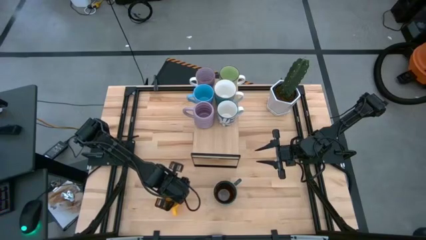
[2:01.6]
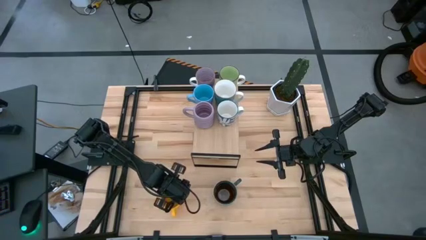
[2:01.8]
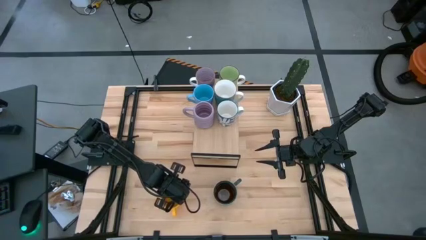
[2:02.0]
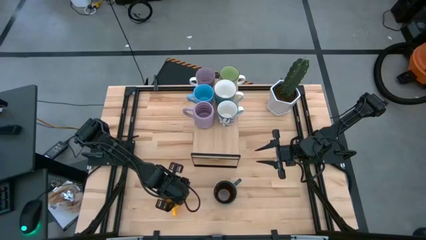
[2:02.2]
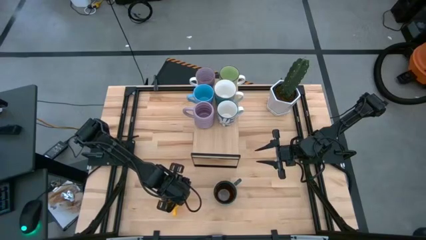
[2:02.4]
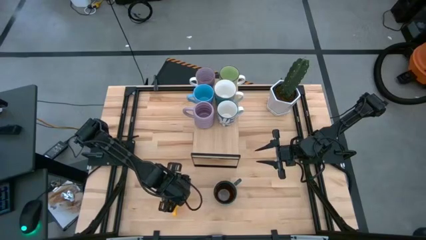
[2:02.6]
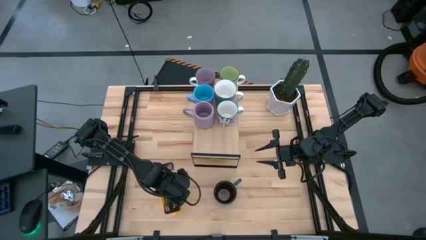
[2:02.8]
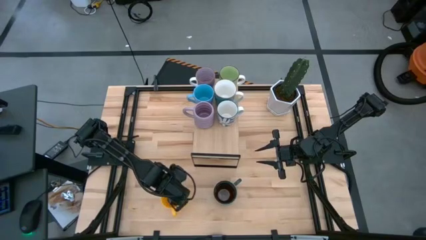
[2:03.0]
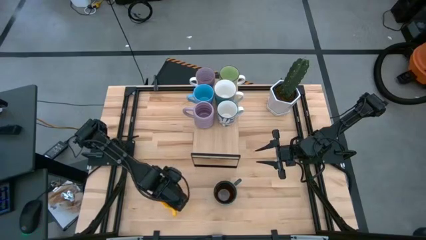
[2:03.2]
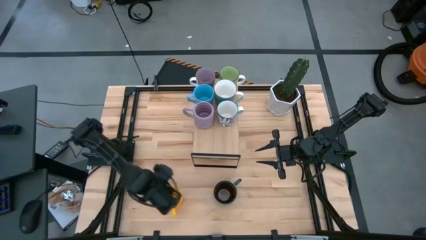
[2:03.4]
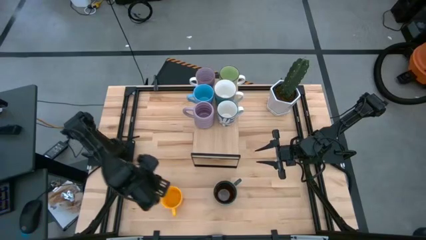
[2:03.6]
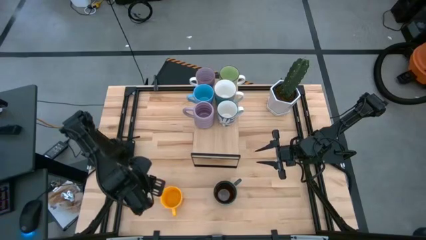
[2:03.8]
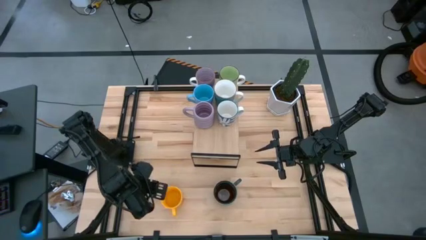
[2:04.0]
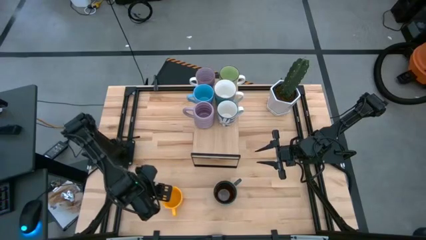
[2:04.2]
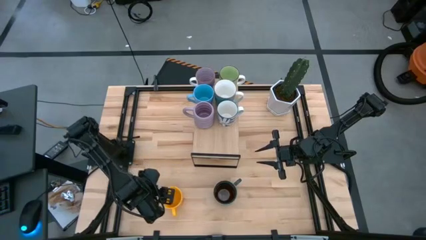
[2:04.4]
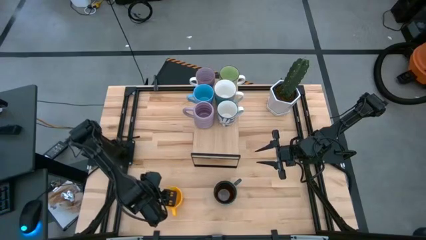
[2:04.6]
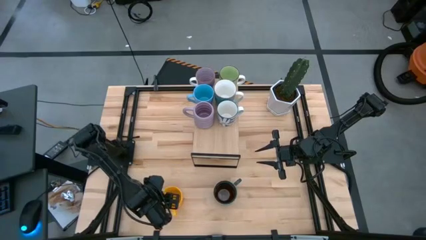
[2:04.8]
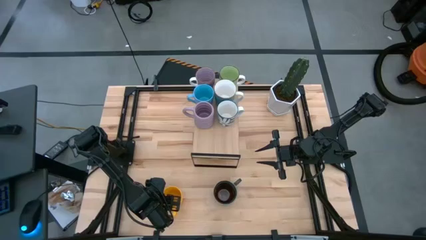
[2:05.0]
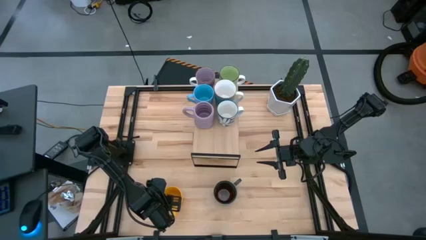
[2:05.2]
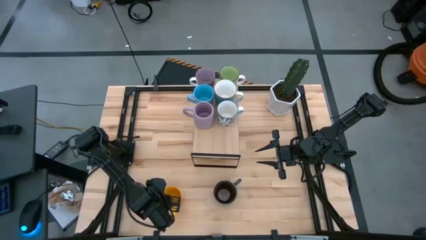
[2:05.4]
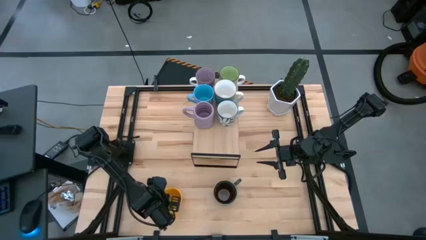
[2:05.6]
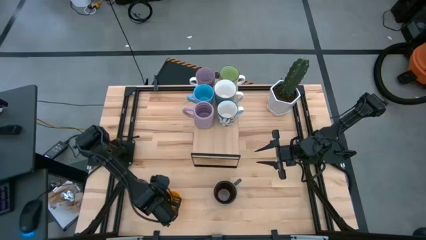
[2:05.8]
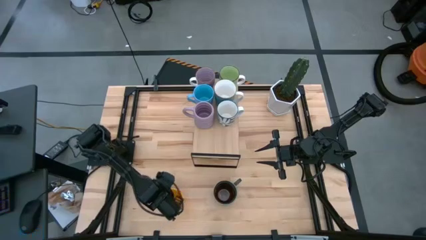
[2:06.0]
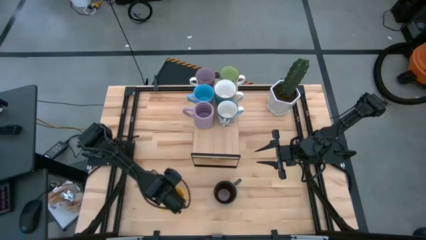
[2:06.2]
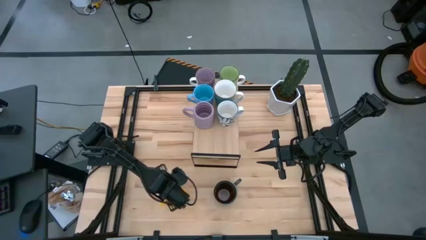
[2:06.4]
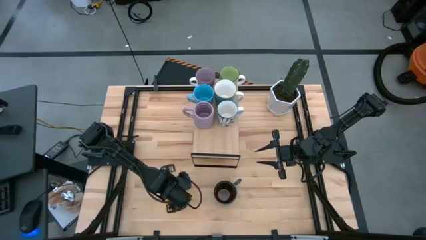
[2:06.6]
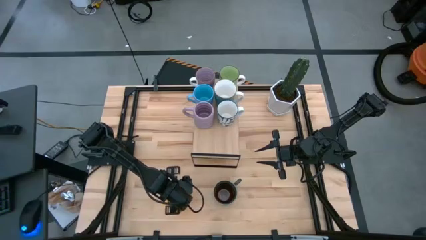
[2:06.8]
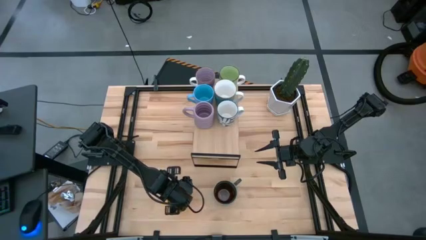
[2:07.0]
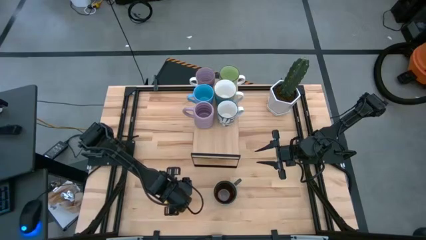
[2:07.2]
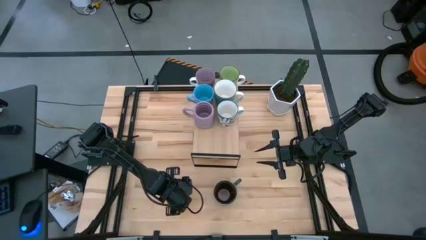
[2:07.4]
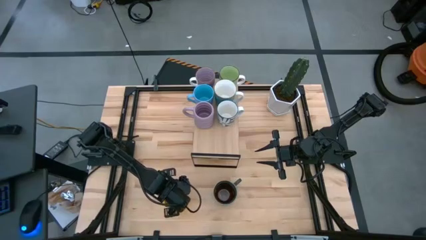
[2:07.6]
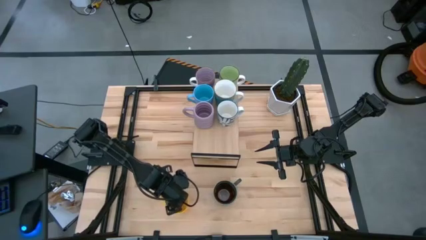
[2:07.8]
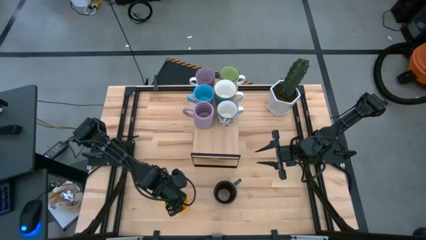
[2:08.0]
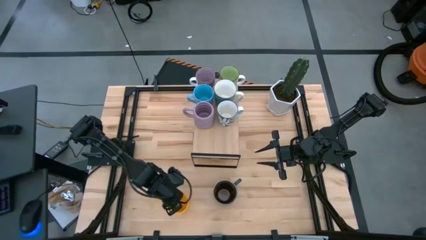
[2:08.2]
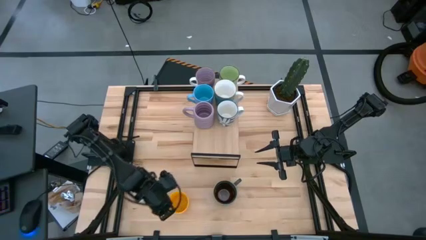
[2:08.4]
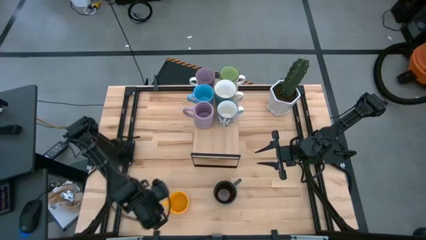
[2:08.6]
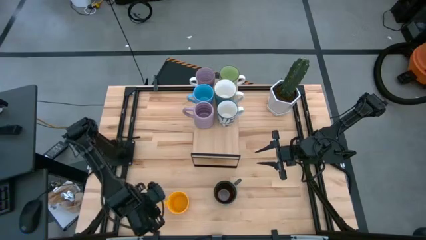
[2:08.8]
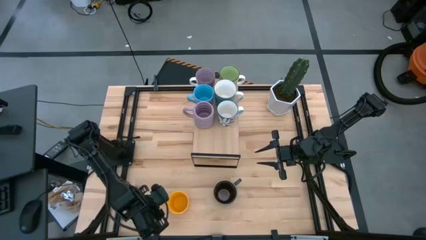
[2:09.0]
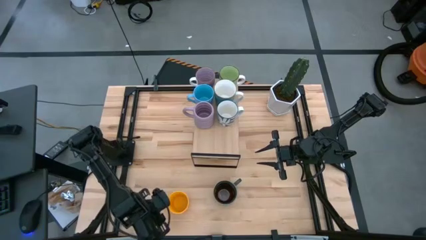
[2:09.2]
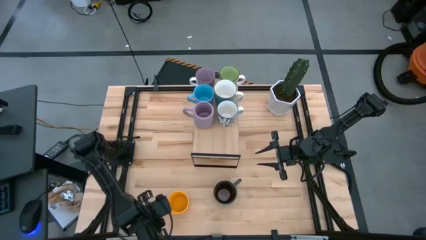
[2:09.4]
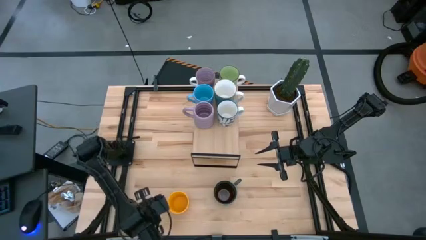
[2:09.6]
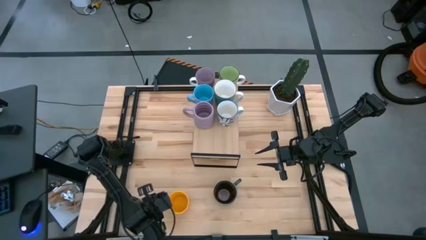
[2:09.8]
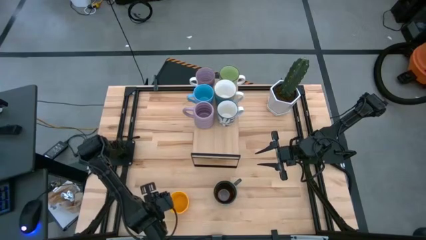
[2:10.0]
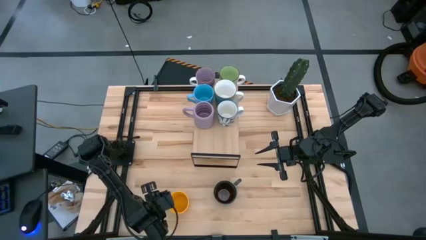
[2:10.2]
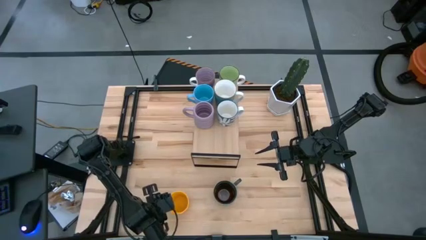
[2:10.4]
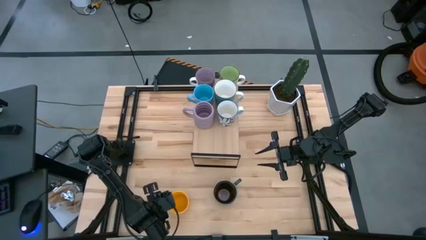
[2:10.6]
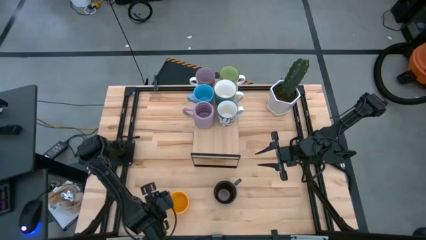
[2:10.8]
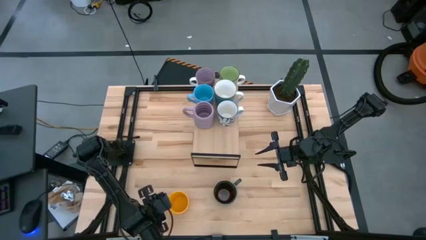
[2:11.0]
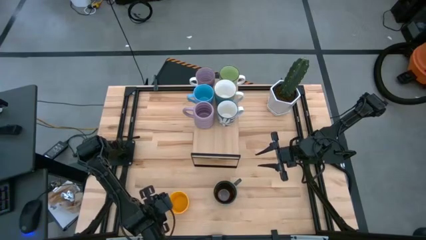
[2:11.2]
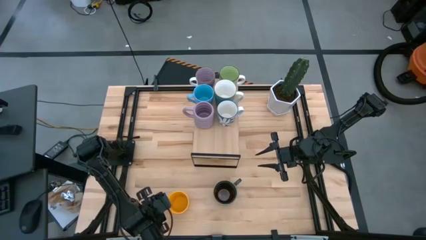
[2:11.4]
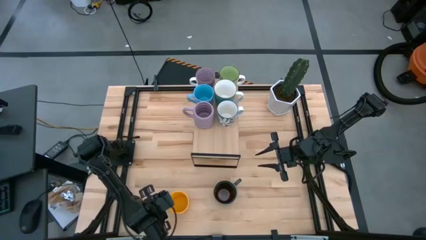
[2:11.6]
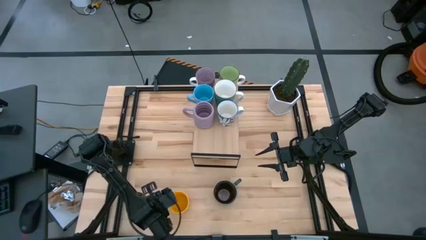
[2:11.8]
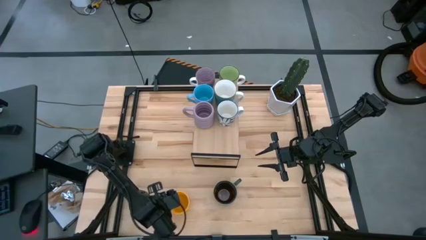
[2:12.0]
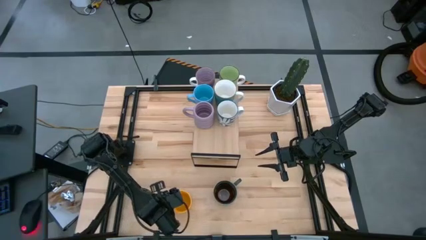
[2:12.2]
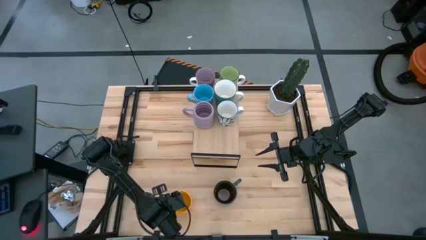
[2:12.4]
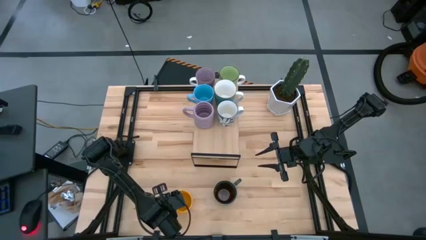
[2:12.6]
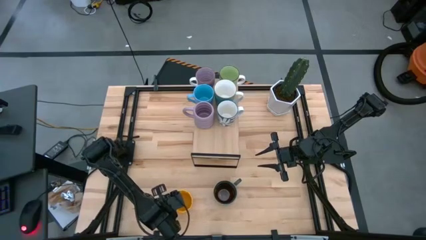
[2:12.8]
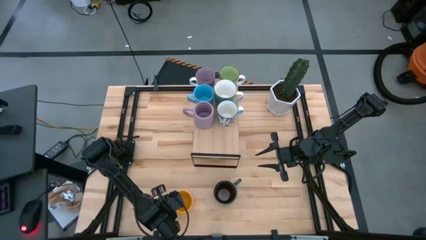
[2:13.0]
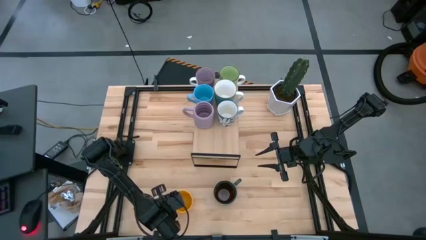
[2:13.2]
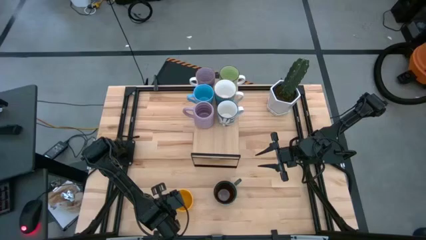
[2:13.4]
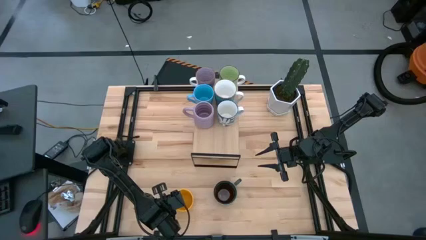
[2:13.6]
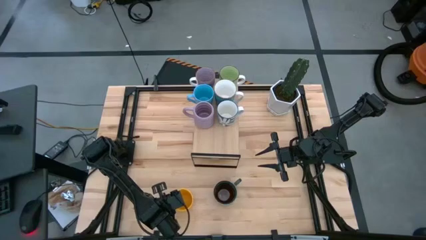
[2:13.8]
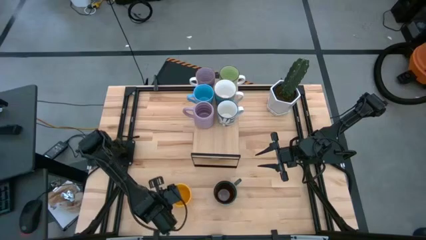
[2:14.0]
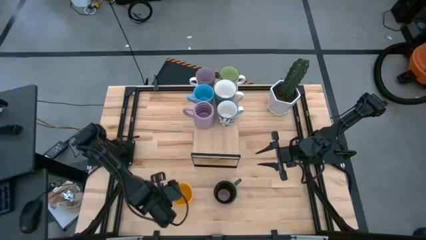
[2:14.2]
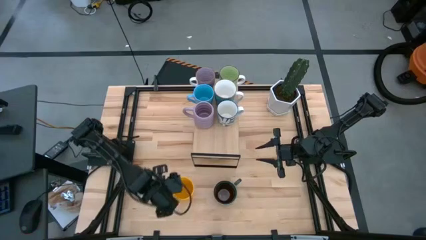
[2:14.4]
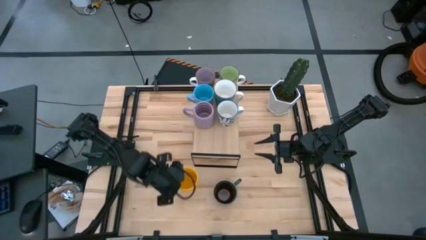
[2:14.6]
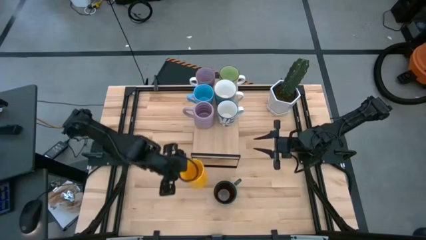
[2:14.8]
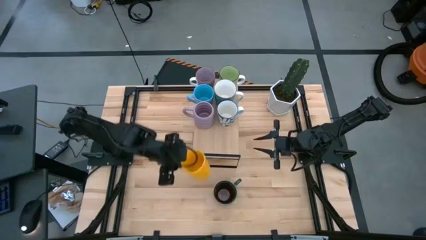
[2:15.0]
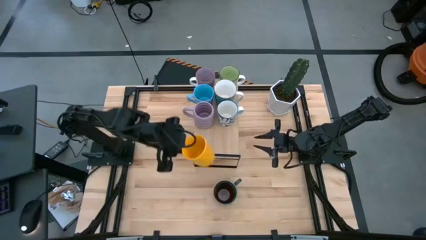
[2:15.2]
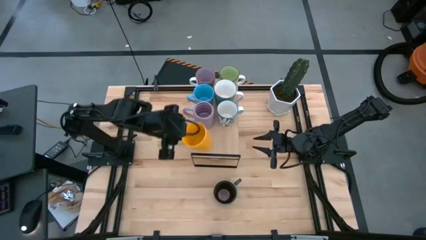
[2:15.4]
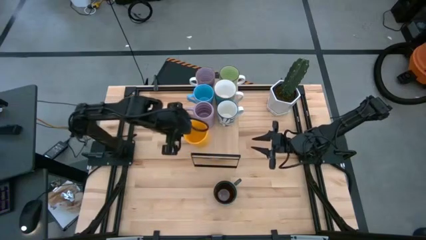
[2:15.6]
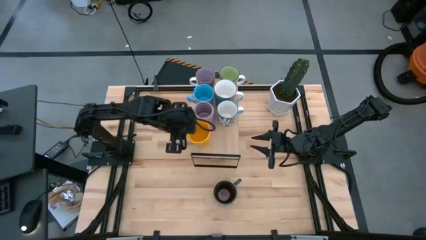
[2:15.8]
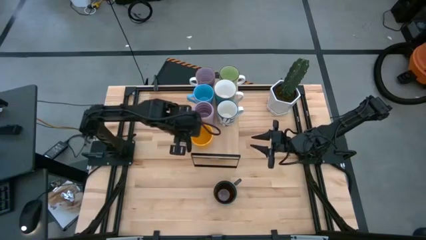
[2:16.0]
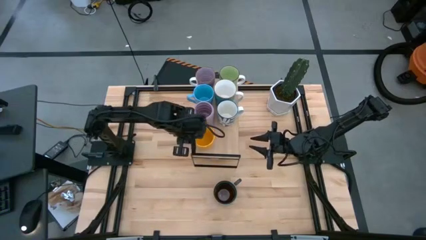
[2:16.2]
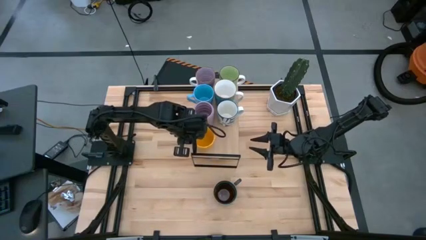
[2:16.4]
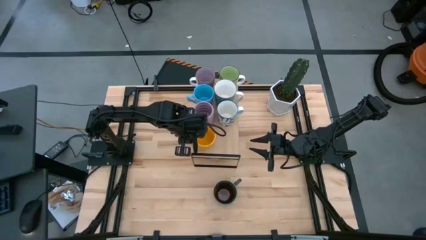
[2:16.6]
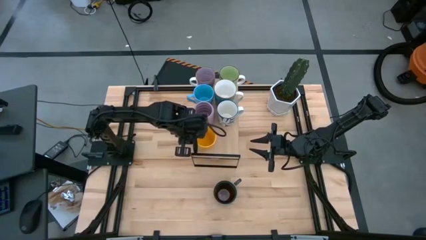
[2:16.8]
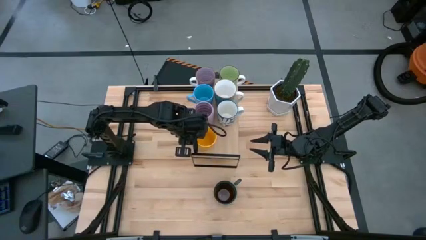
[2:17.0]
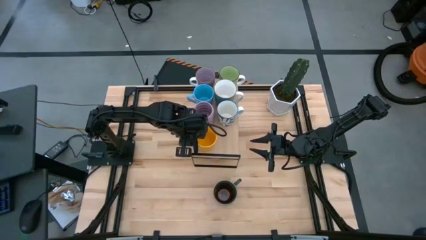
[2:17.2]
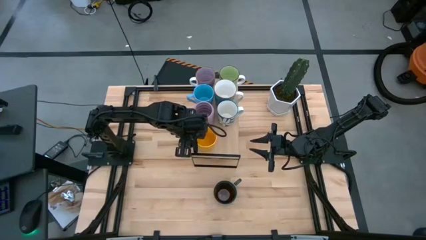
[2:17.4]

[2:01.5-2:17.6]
Task: Place coffee mugs
Put the yellow mug on the shelf

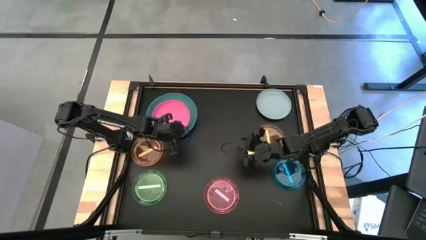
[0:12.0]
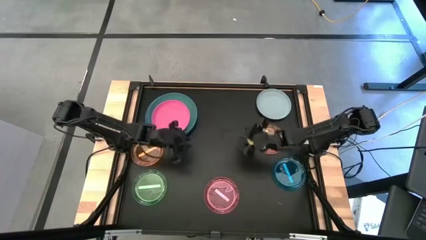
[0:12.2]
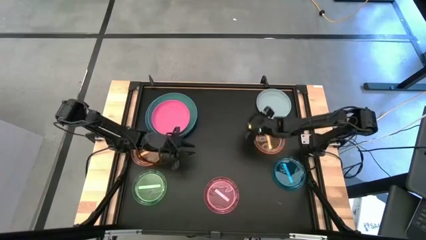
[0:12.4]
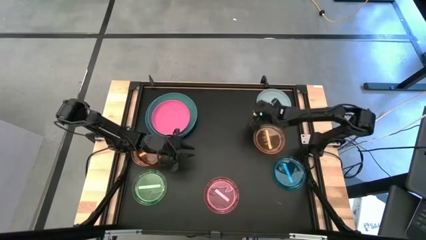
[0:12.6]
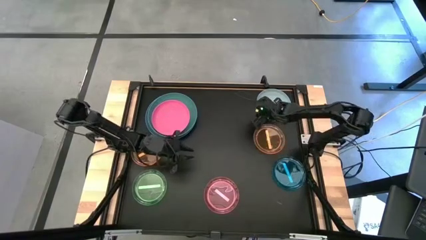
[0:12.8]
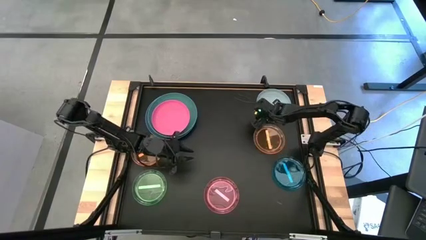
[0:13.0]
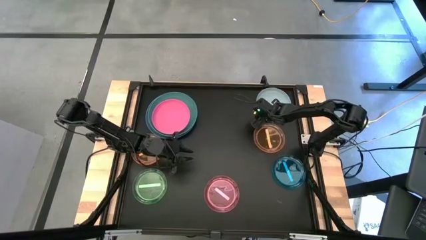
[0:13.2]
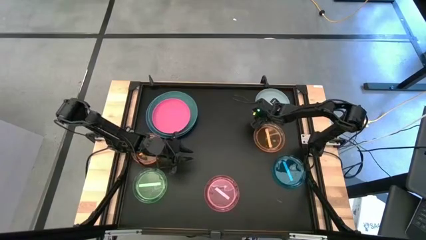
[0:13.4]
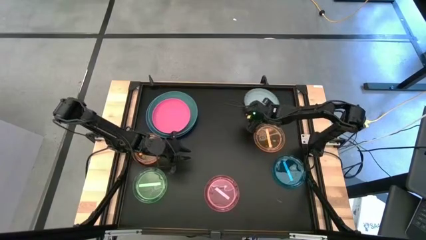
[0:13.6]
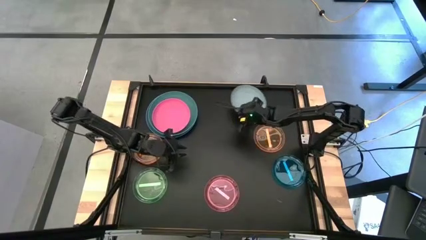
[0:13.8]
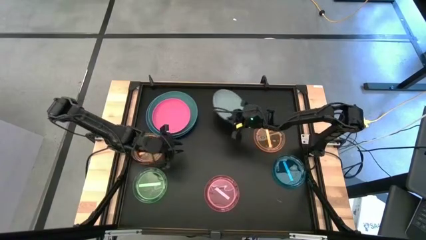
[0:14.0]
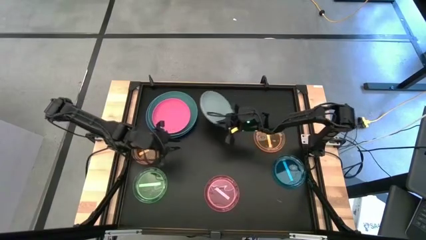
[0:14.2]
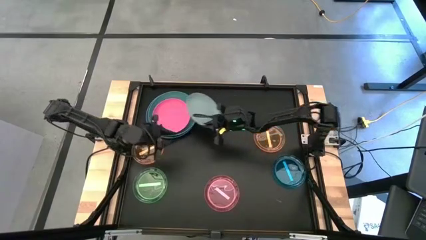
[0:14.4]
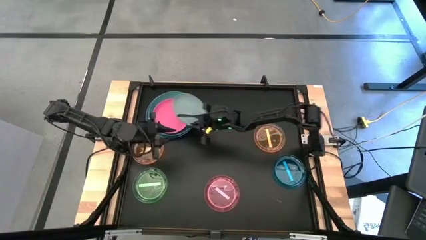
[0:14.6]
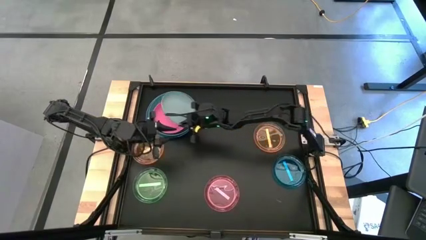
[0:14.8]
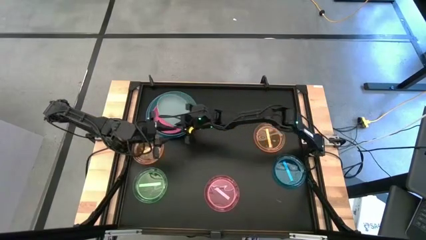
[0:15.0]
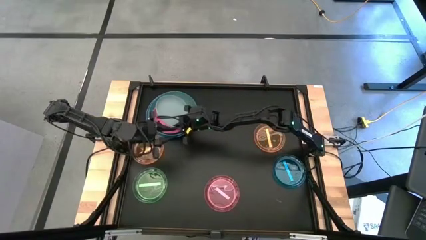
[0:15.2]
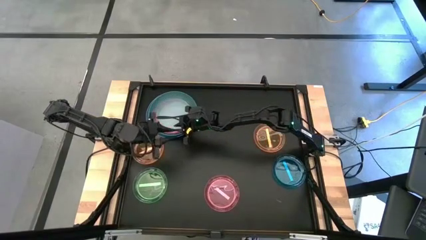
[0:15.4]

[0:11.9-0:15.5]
Task: Stack plastic plates
Stack the gray plate on the pink plate
